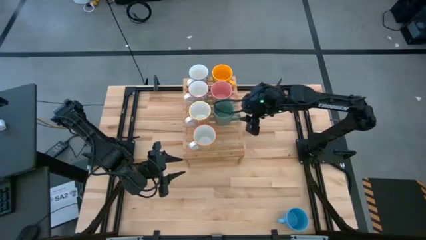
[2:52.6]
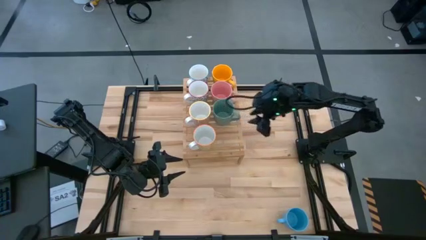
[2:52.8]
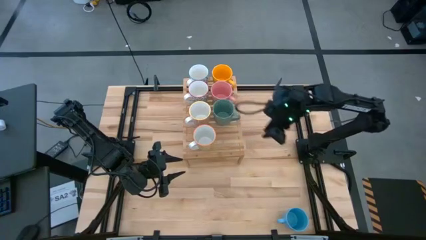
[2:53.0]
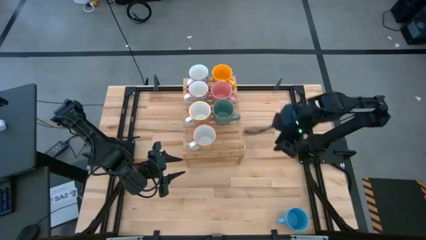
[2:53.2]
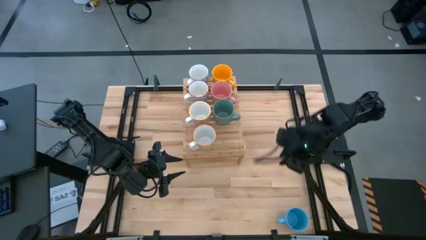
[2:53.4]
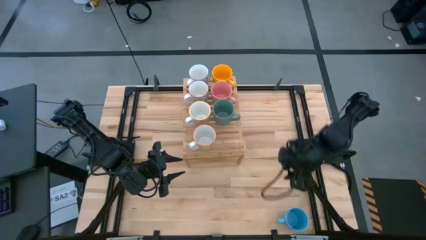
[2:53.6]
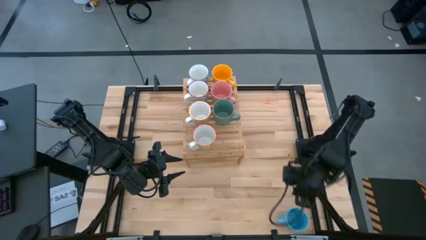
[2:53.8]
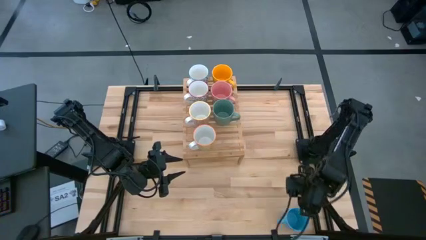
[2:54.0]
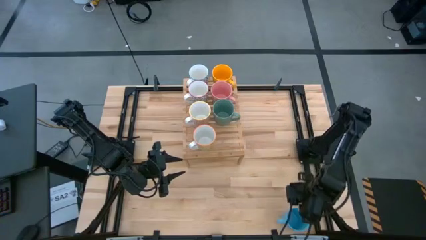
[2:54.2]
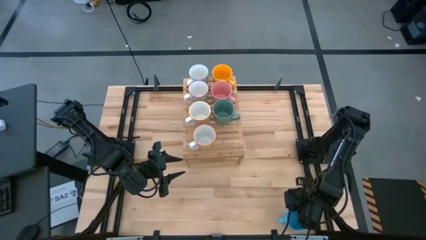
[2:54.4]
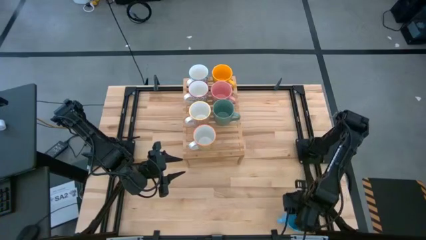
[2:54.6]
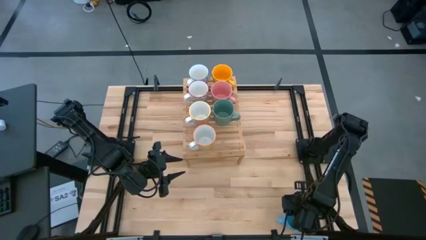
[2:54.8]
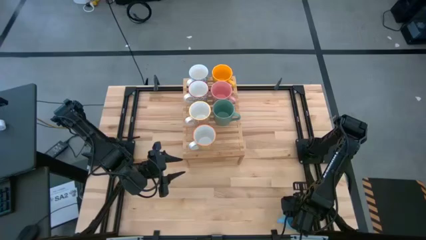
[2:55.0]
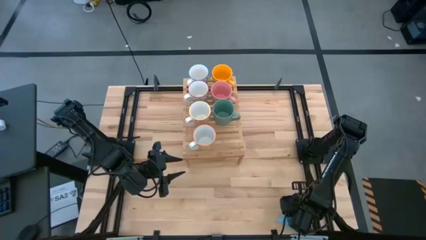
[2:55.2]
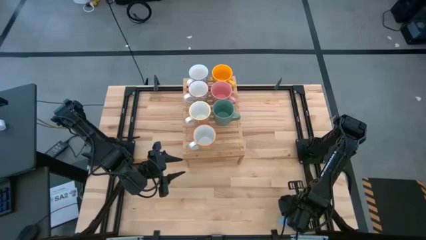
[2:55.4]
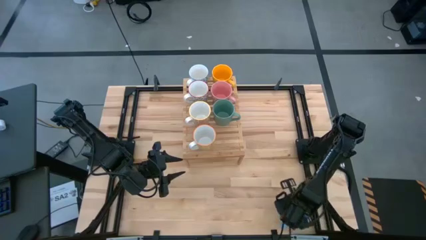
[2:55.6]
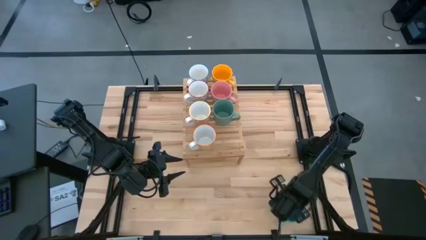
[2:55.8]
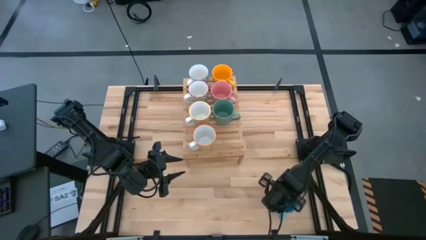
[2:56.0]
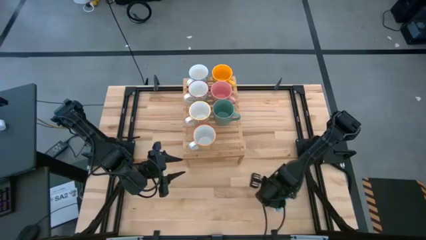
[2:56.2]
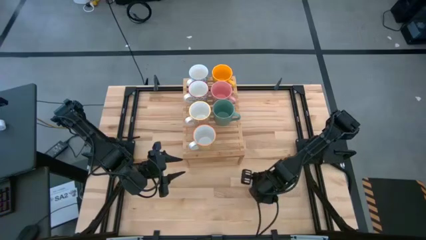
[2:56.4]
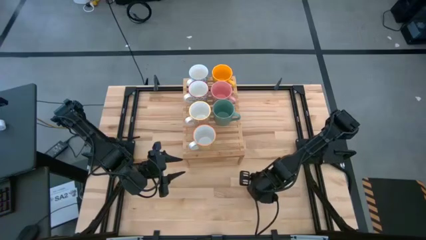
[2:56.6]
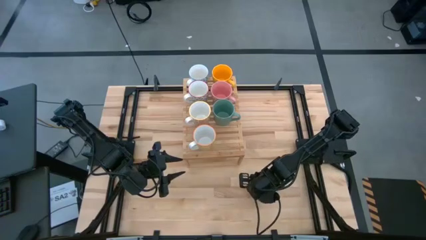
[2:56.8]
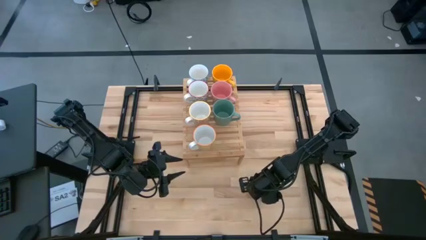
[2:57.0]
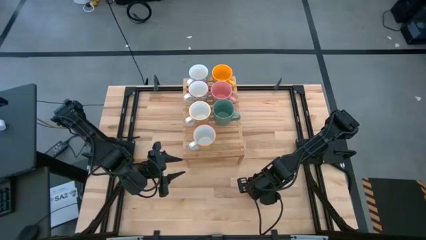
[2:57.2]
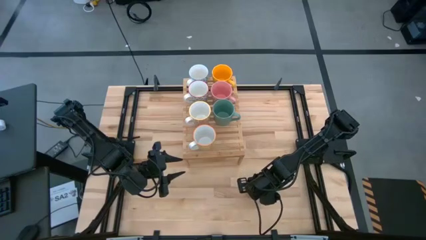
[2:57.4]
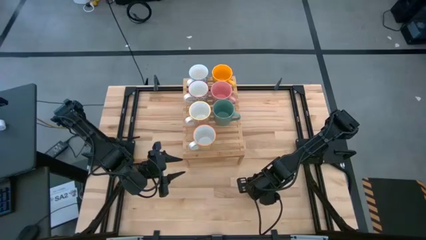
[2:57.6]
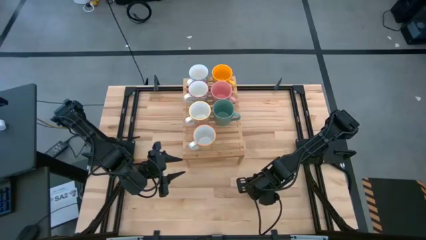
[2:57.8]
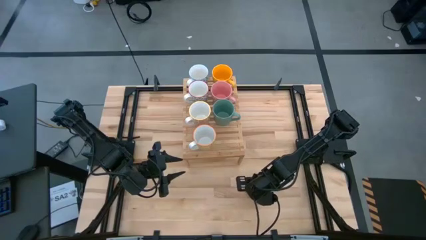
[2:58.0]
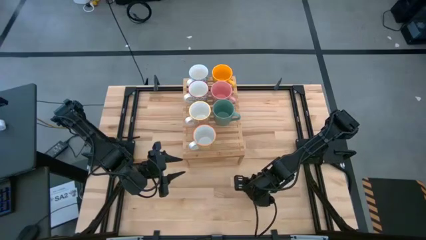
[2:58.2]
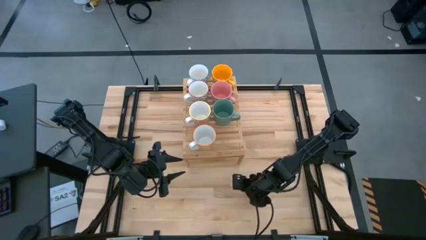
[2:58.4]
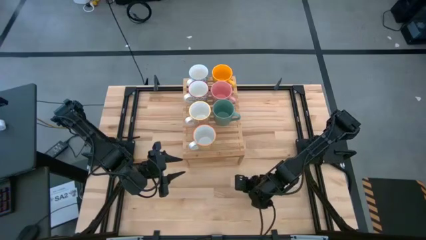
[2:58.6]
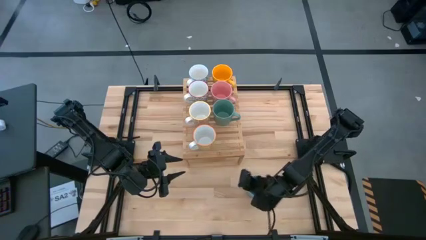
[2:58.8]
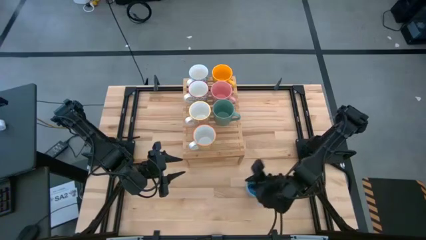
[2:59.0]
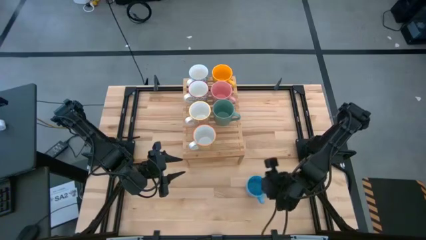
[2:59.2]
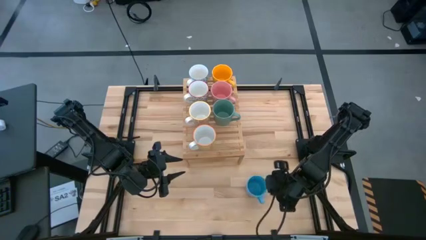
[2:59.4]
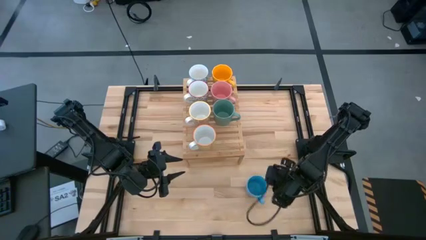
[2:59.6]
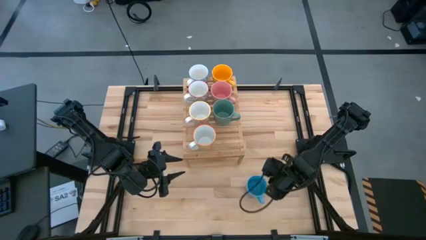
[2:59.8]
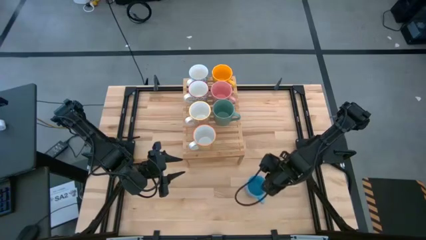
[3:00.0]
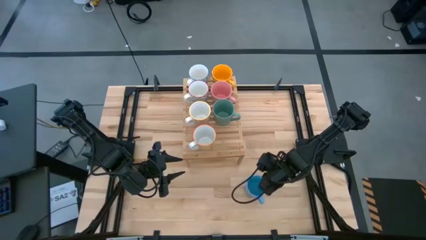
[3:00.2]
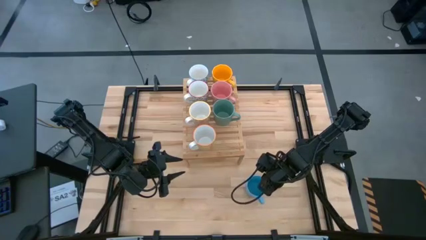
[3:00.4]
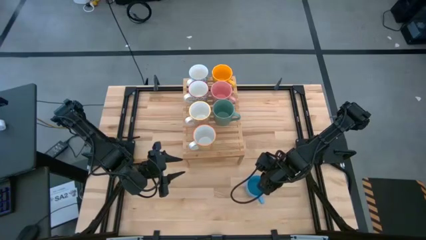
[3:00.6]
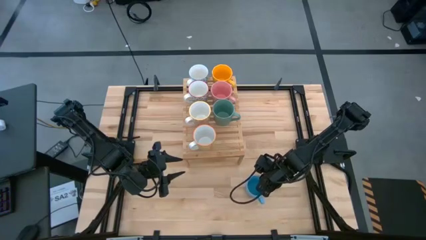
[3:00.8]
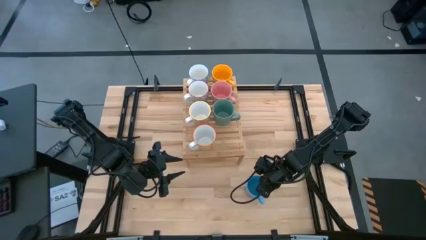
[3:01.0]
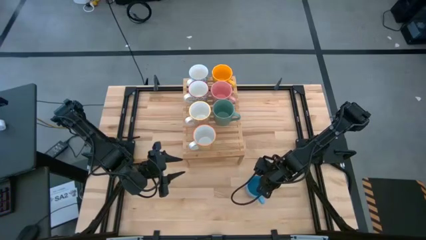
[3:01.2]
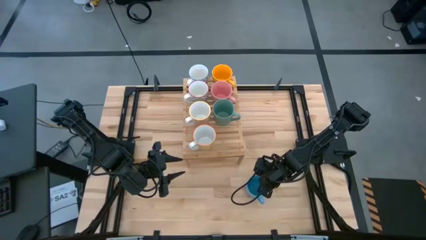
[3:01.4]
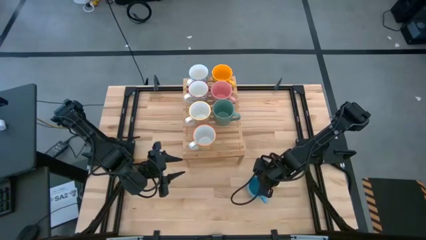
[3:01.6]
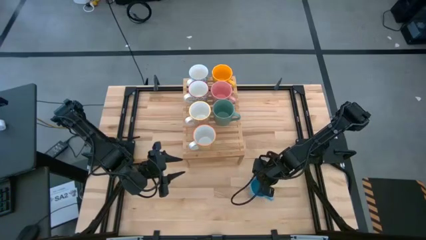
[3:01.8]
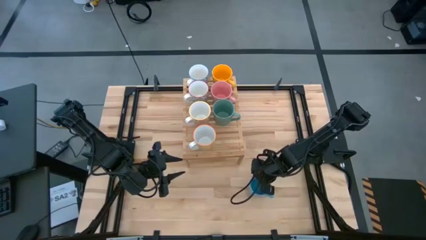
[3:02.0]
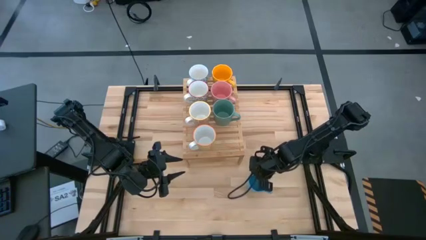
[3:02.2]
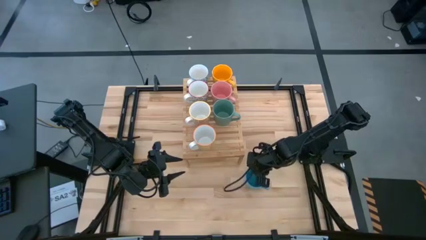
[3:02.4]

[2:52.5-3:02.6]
Task: Place coffee mugs
Put the blue cup on the shelf aligned with the other green cup

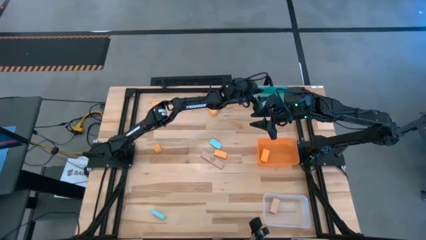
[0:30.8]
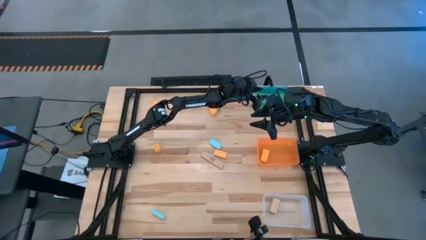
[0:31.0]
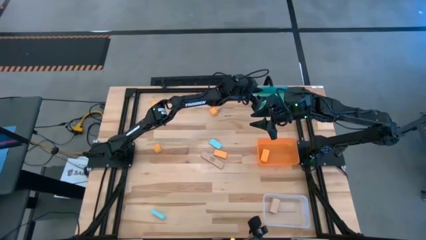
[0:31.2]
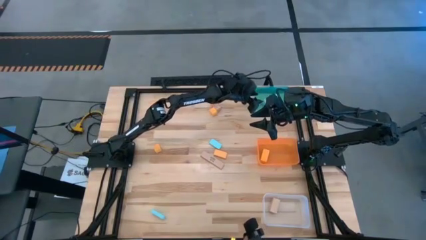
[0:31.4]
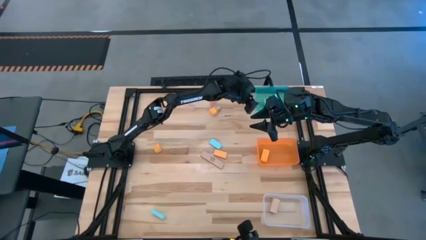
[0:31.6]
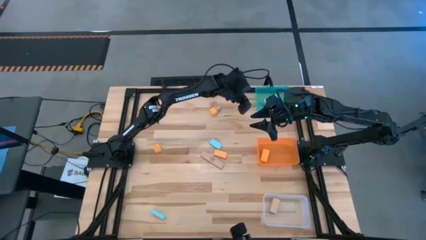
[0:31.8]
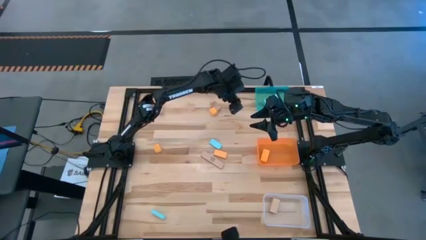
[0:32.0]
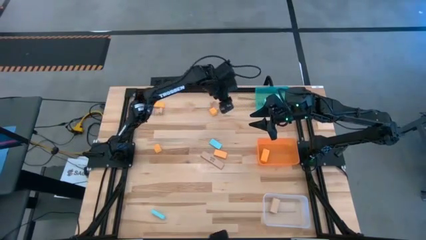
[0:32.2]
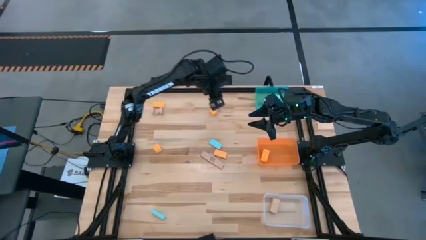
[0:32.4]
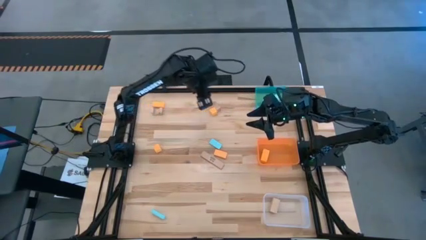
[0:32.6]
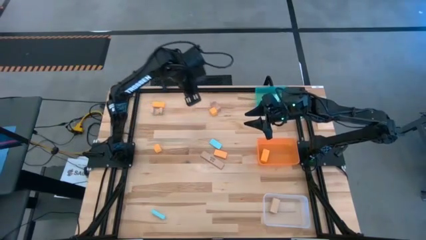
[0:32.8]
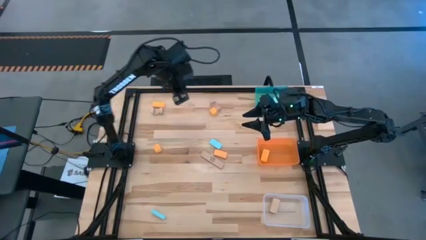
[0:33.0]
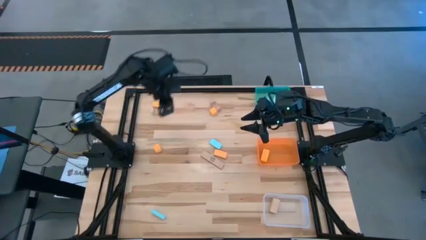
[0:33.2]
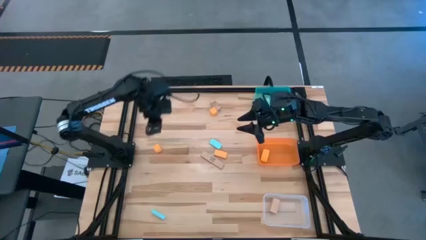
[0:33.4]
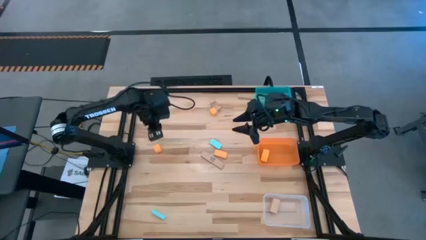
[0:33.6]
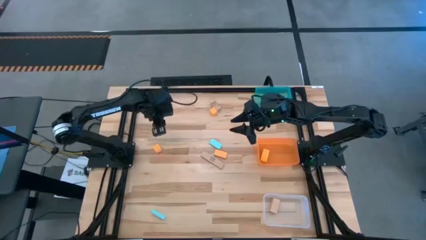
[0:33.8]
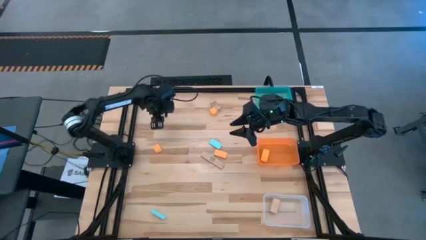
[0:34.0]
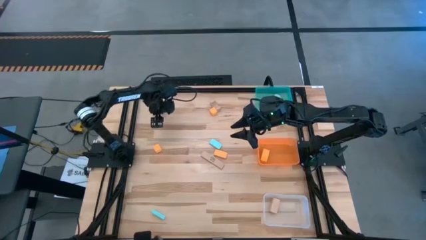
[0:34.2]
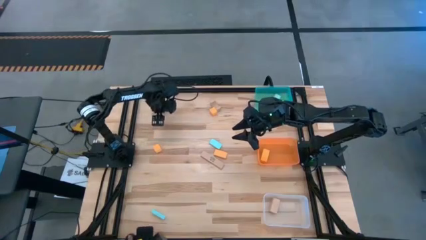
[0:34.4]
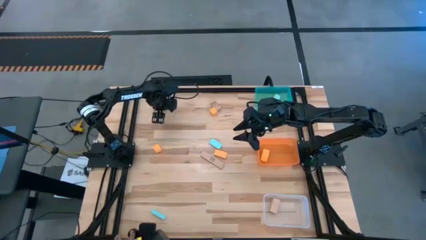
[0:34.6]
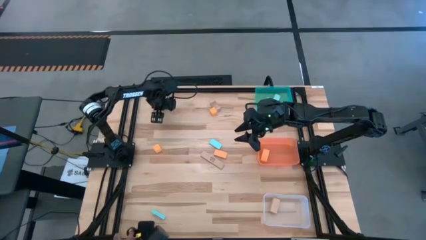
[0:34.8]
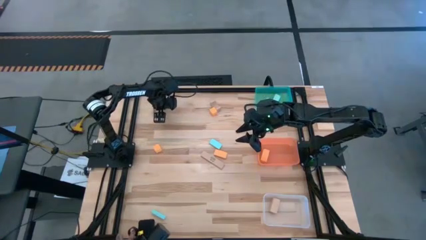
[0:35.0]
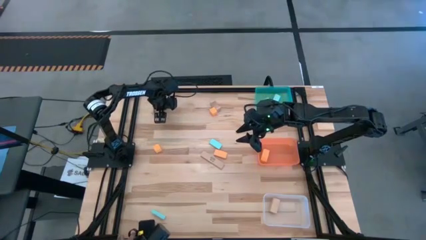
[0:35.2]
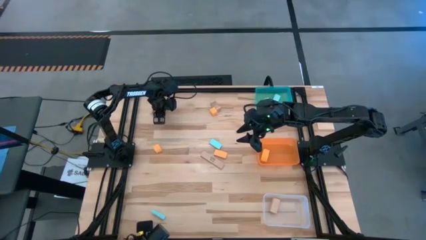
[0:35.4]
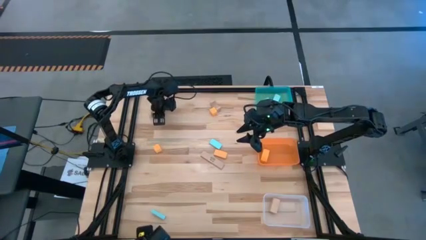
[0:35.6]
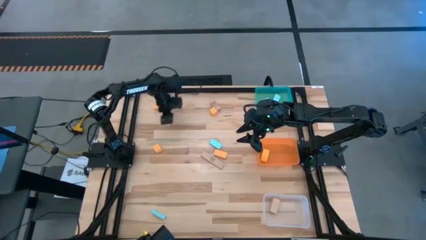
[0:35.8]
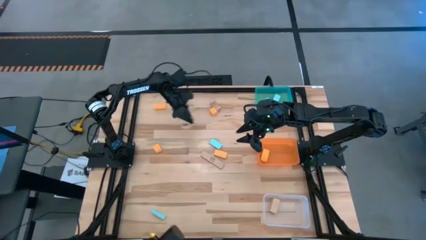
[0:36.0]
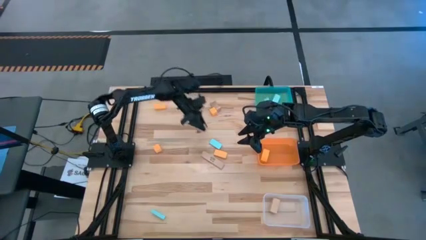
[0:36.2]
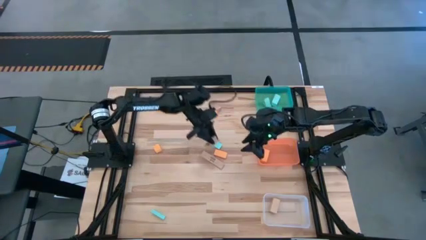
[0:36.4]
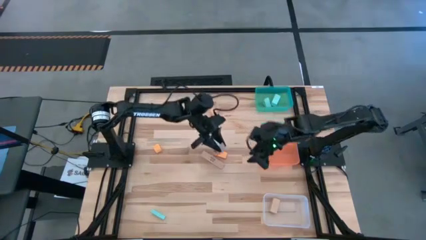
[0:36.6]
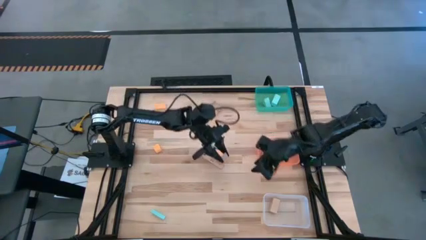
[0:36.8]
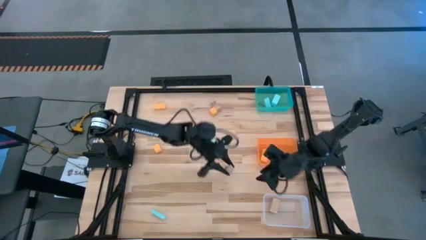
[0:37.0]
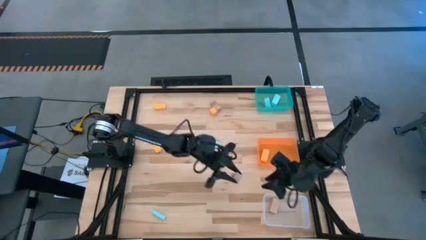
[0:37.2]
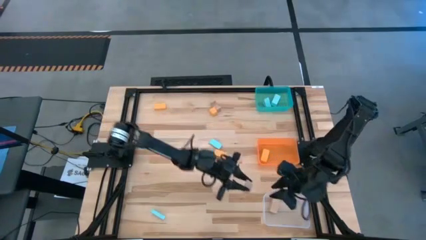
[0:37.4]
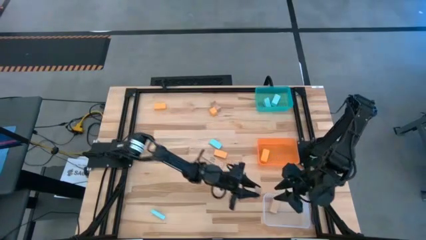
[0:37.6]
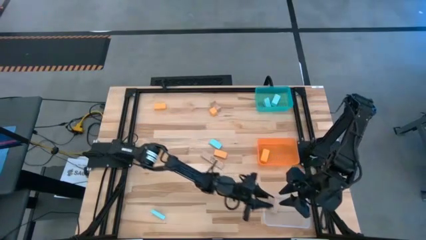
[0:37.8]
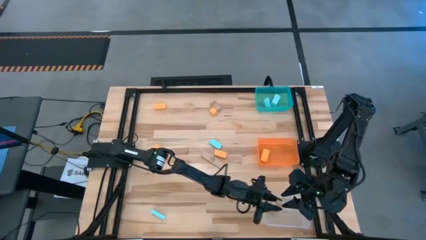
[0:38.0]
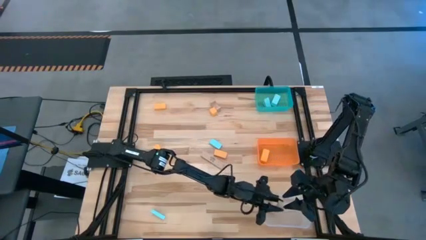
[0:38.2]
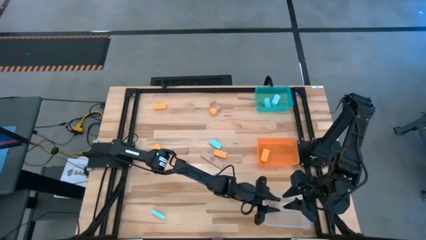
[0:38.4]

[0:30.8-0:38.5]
Task: Sort & place blocks by color
Put the brown block into the transparent bin
